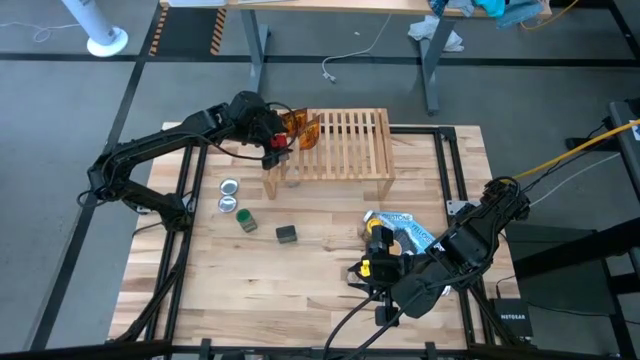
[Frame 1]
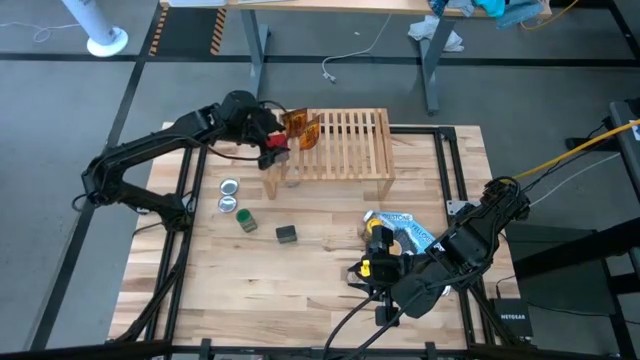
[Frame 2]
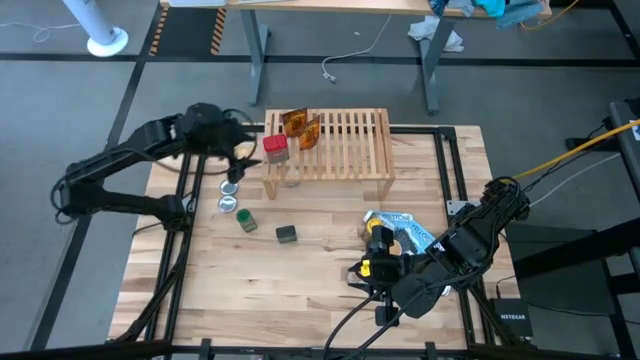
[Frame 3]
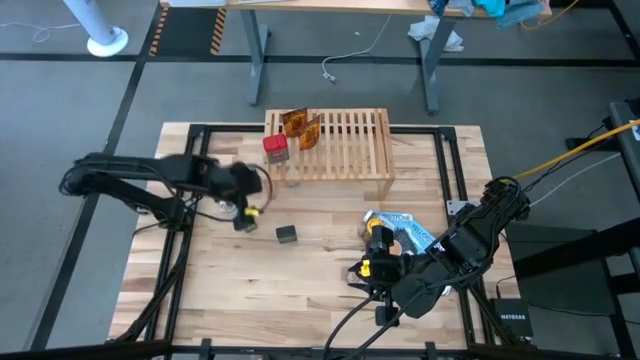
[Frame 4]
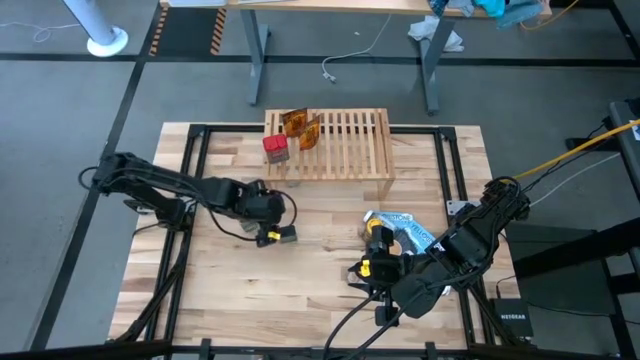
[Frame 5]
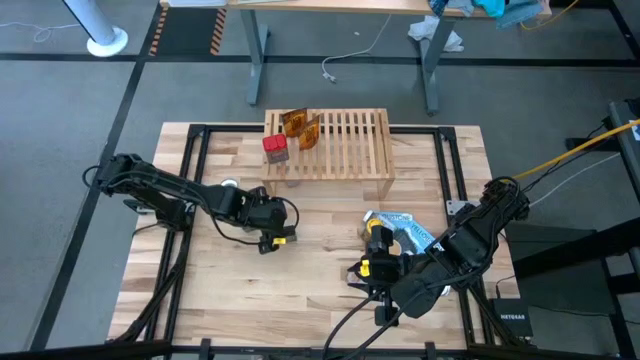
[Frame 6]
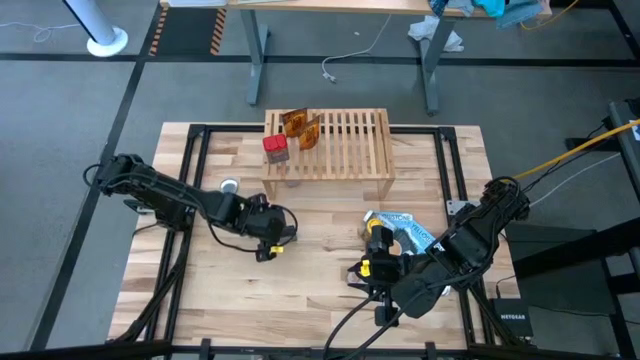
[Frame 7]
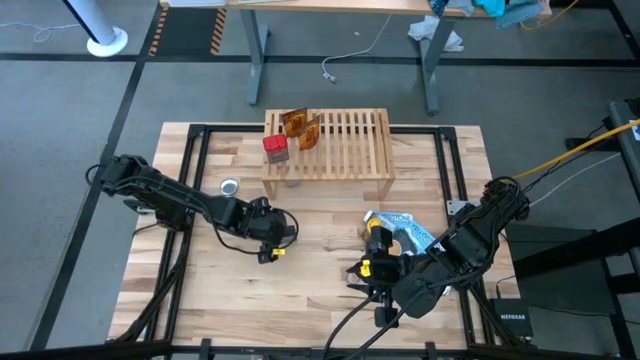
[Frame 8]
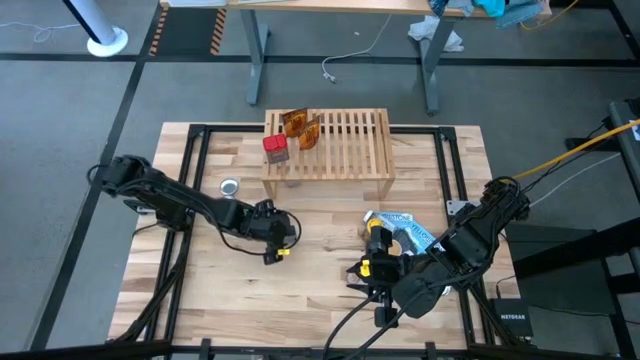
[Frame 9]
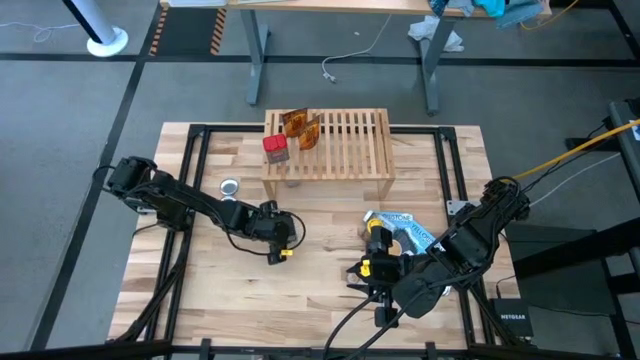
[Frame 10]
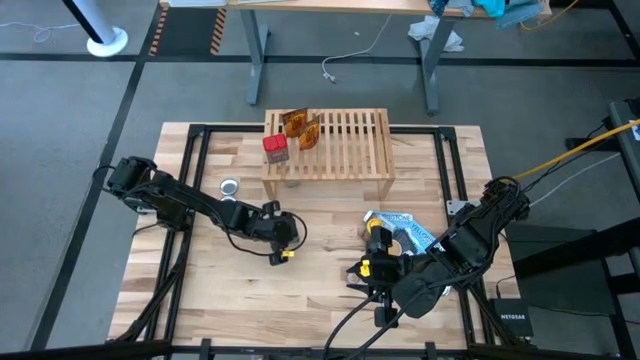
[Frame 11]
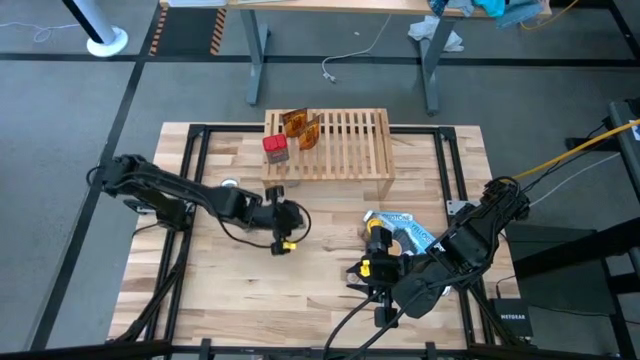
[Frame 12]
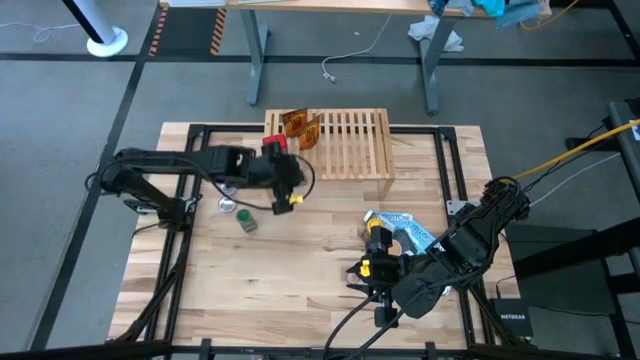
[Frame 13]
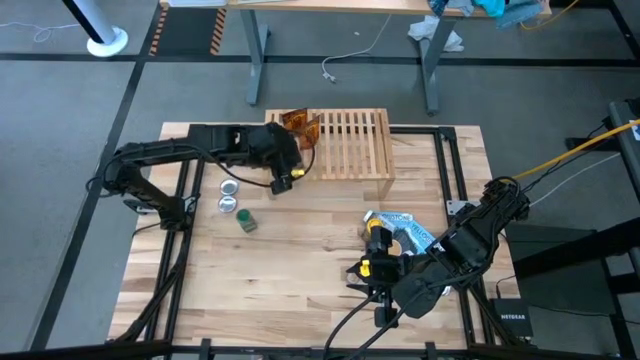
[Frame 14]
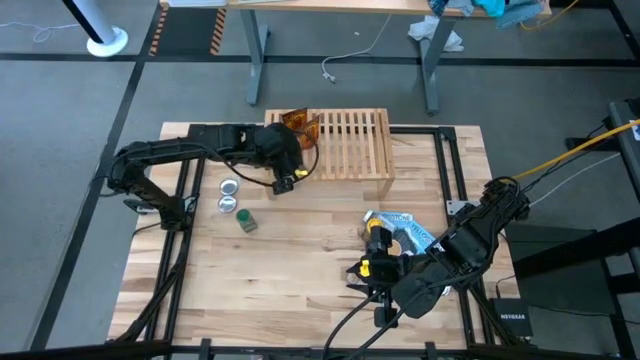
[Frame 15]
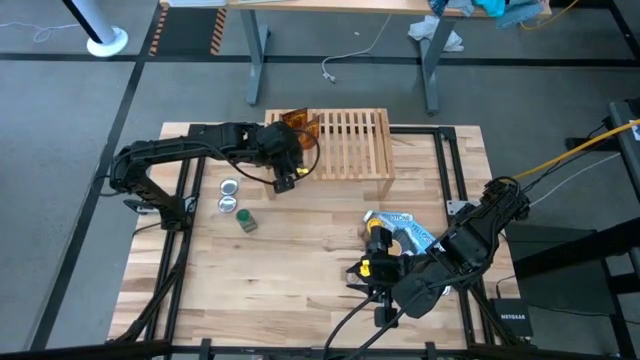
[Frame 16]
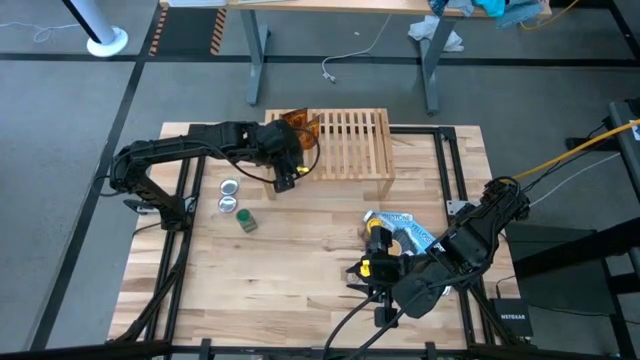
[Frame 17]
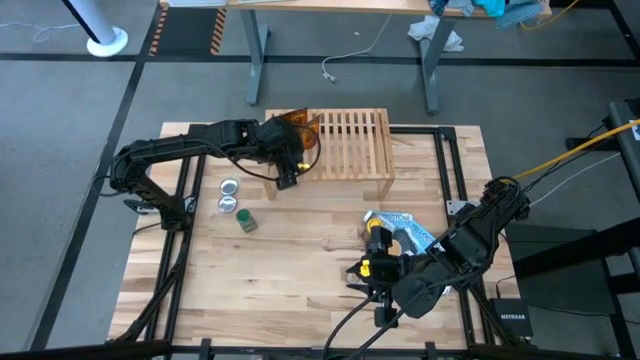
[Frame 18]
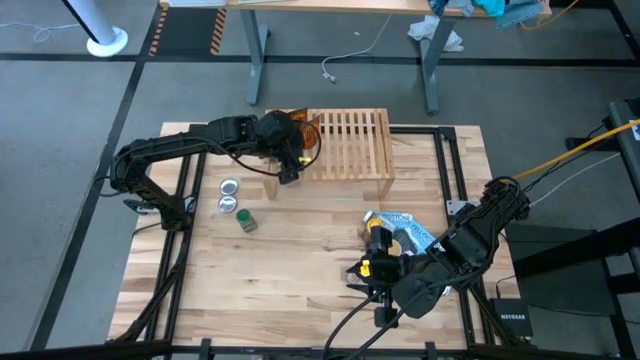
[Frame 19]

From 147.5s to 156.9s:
Task: Shelf spices
Put the black seasoning can on the shelf

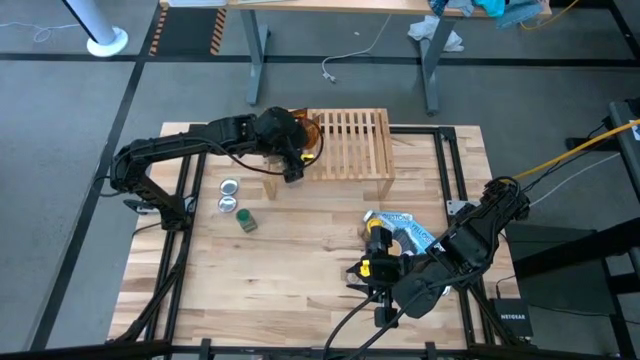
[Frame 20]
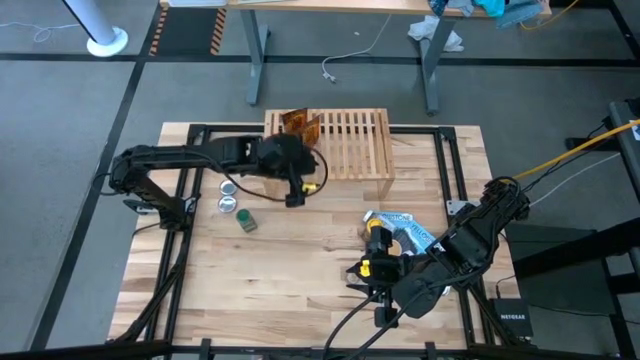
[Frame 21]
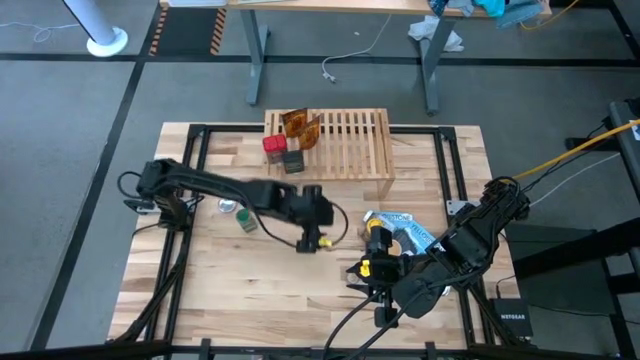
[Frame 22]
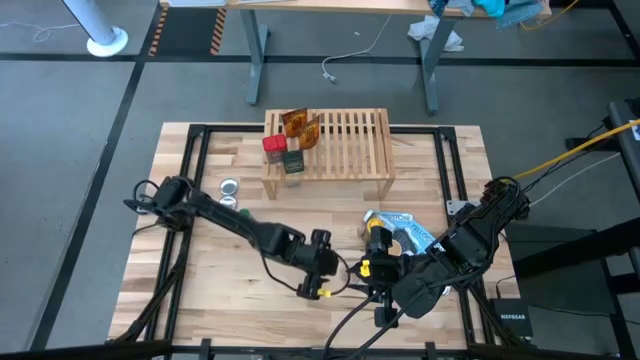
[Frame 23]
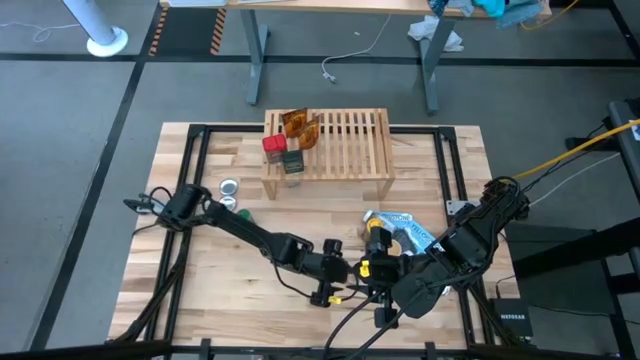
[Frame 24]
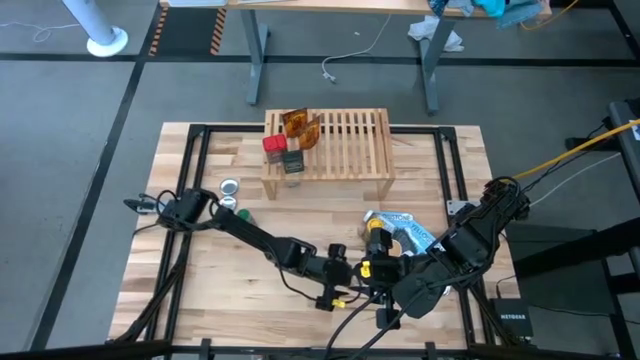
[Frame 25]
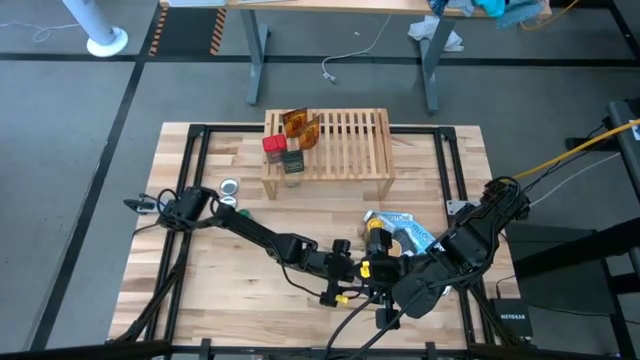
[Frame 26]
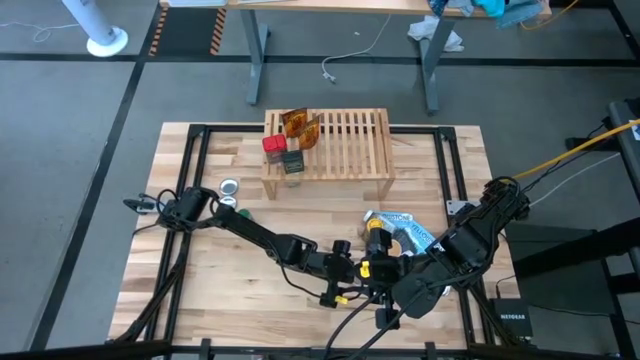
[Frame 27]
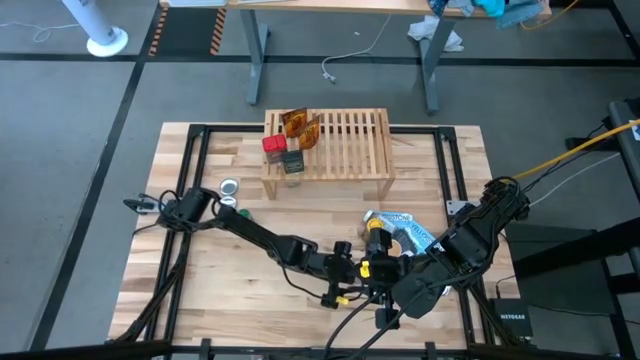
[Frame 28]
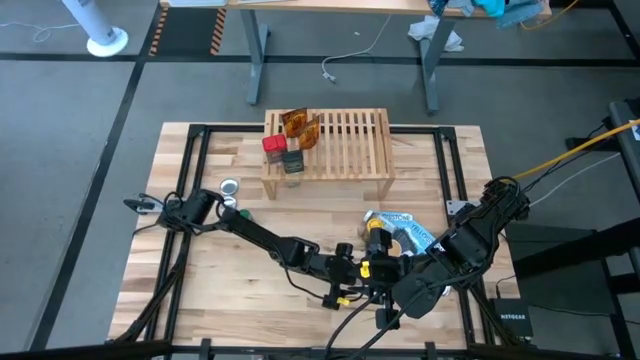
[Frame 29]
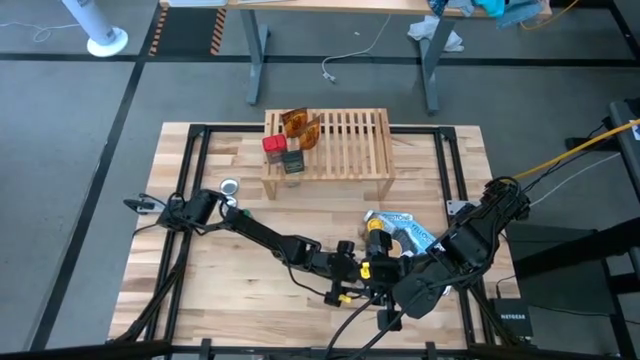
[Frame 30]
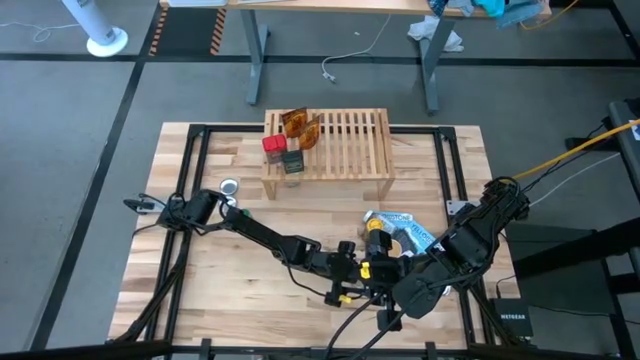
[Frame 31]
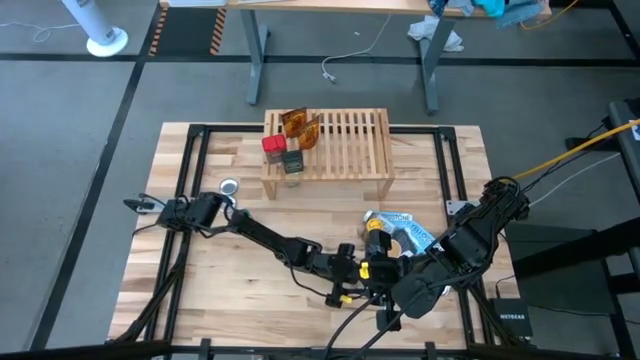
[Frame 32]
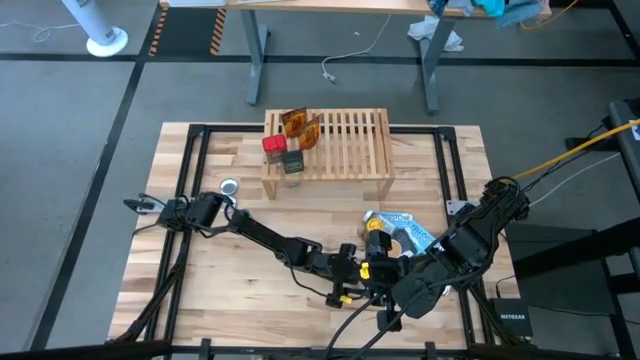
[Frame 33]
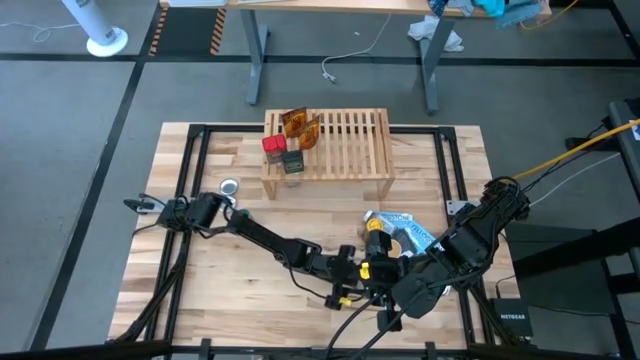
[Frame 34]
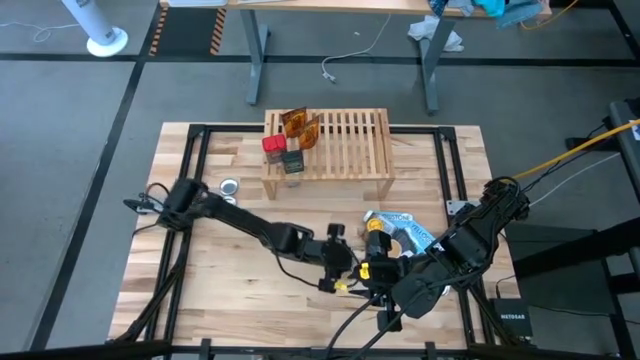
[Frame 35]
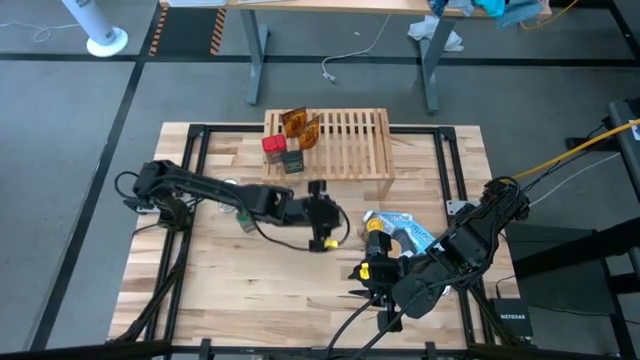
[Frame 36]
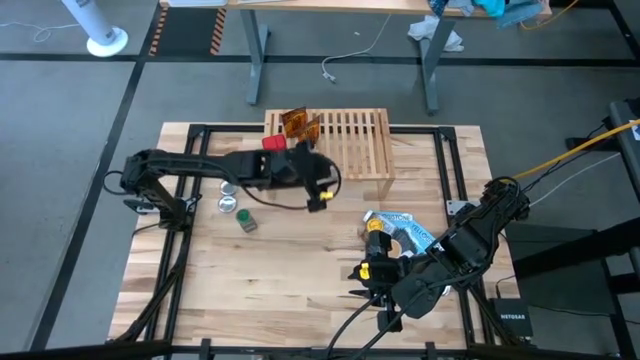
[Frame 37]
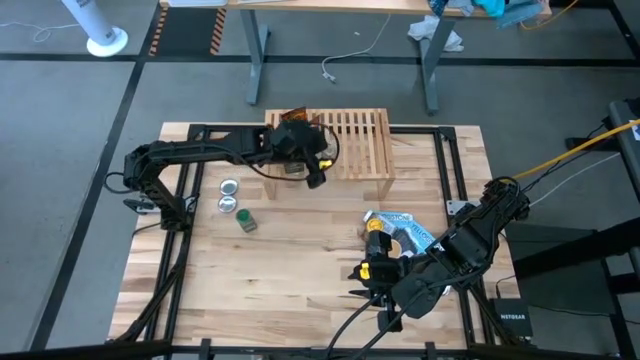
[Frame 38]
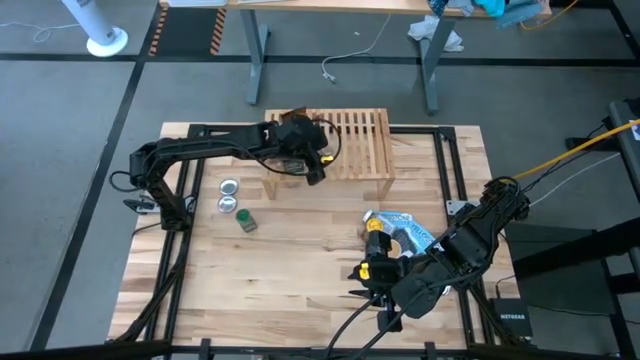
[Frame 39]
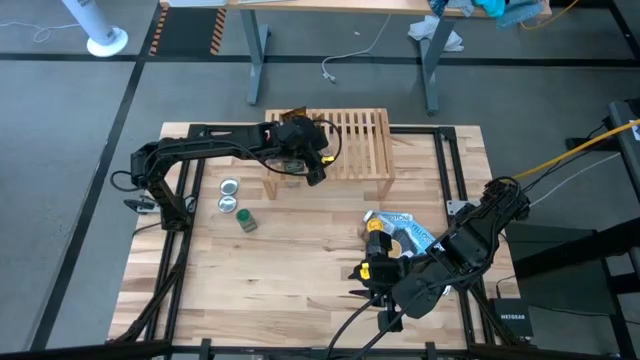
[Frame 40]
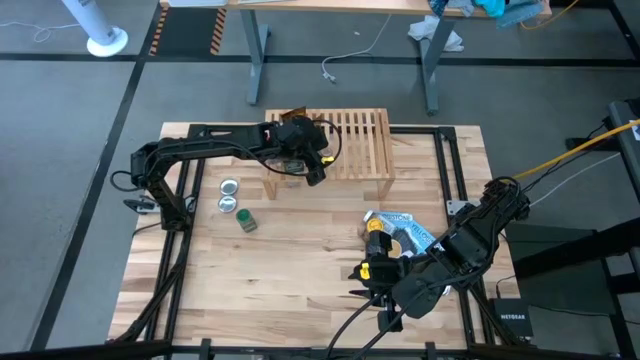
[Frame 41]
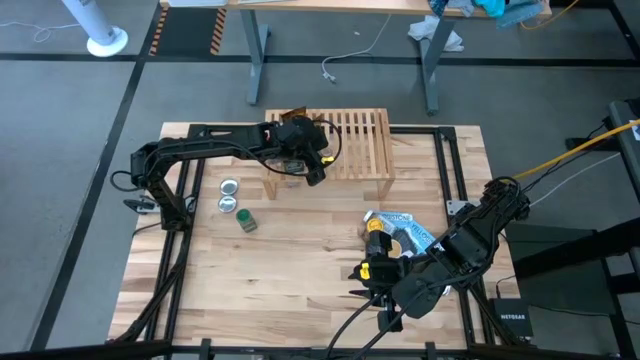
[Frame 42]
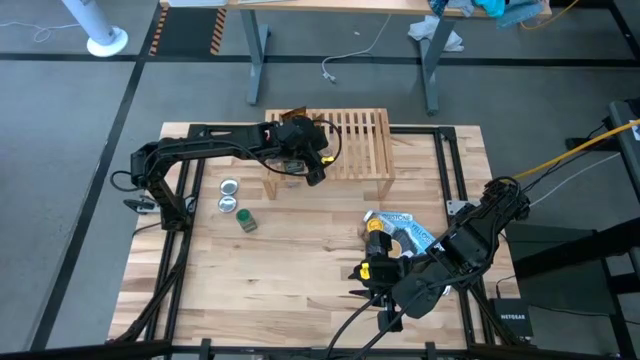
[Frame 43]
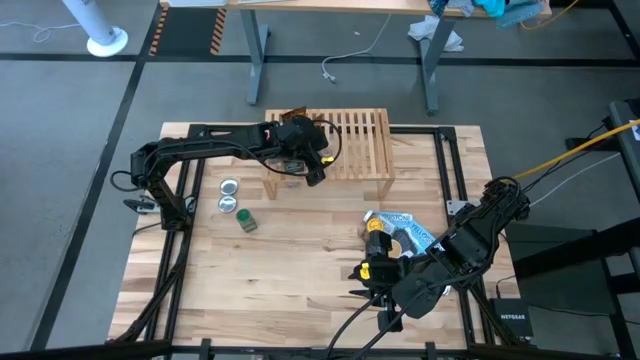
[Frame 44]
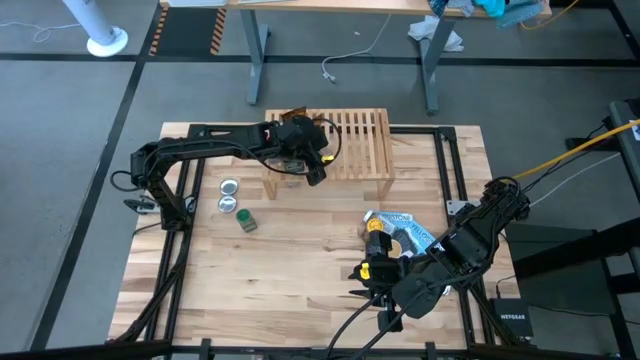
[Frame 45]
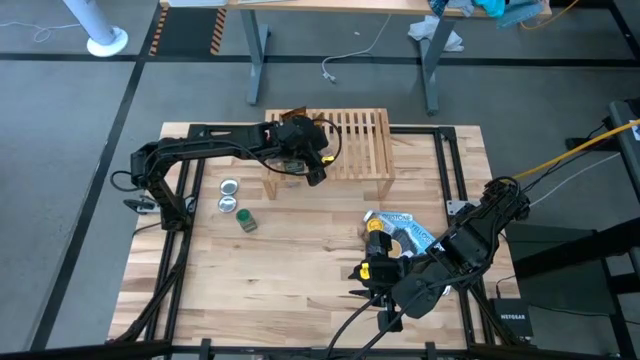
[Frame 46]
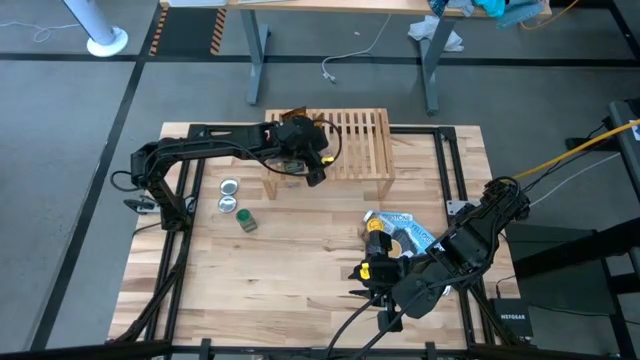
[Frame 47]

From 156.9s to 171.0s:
Put the brown seasoning bottle on the shelf
